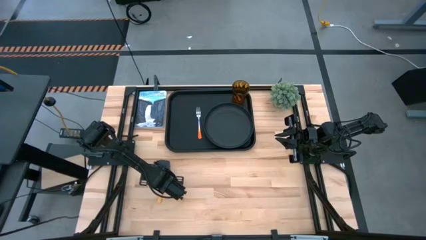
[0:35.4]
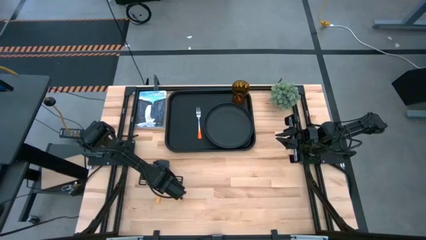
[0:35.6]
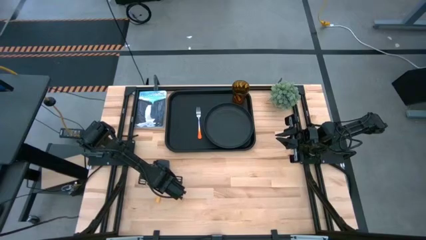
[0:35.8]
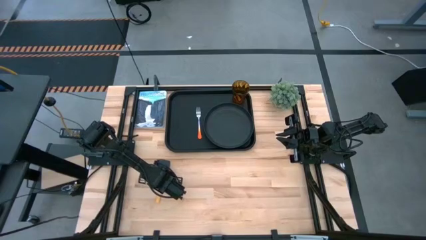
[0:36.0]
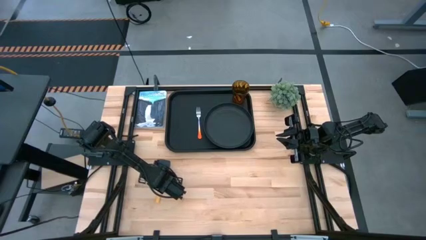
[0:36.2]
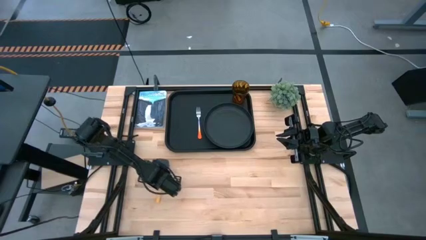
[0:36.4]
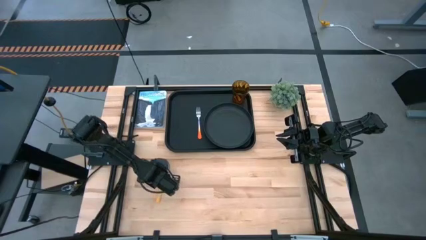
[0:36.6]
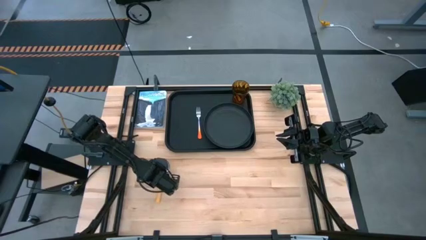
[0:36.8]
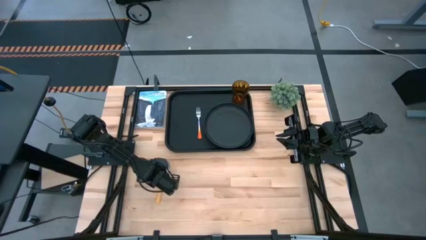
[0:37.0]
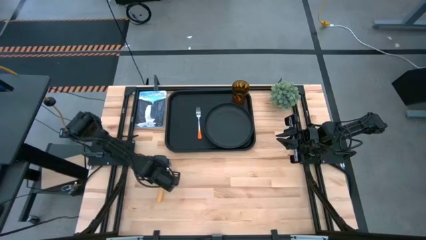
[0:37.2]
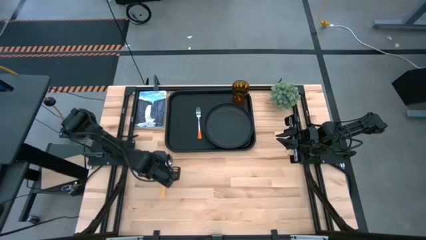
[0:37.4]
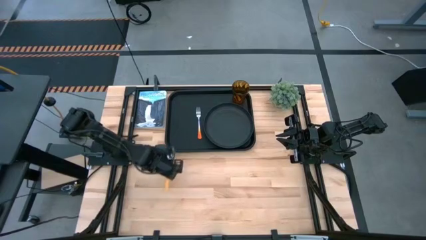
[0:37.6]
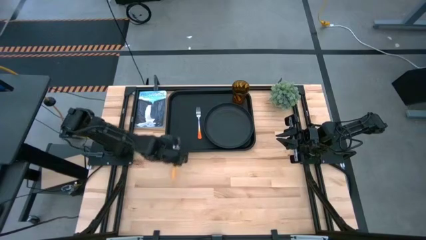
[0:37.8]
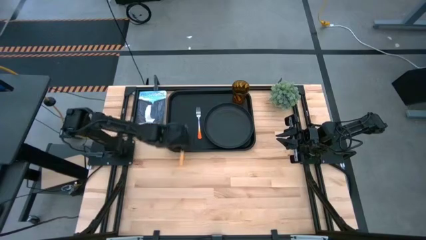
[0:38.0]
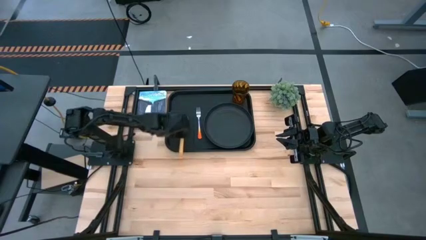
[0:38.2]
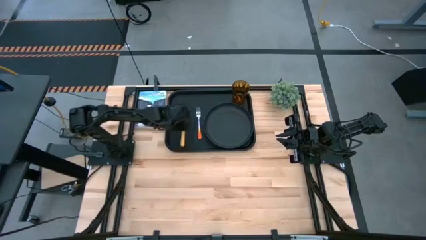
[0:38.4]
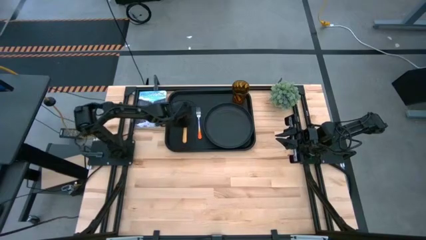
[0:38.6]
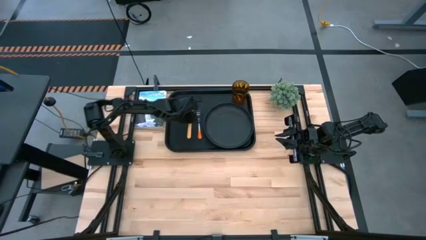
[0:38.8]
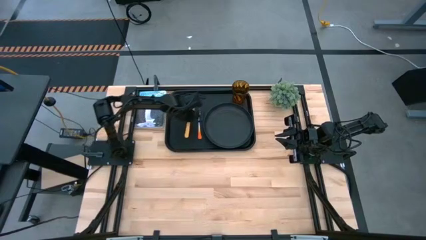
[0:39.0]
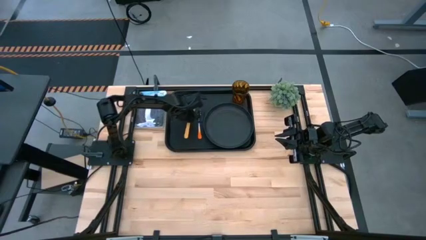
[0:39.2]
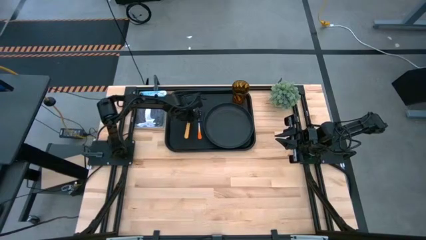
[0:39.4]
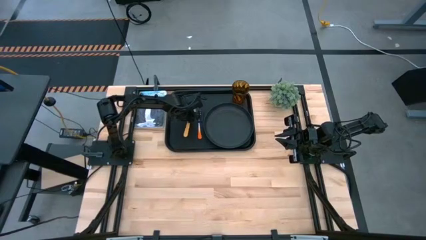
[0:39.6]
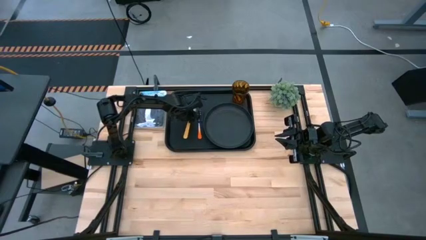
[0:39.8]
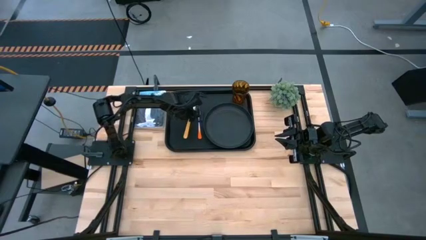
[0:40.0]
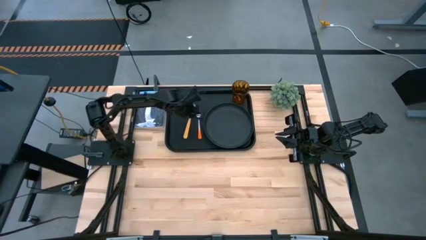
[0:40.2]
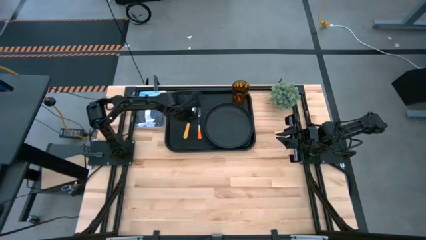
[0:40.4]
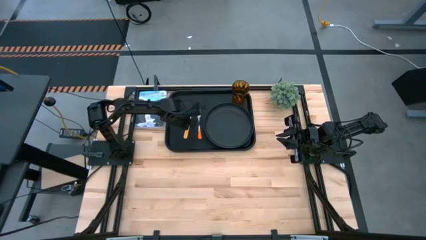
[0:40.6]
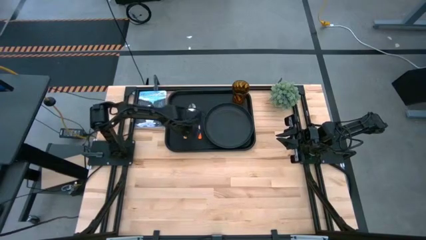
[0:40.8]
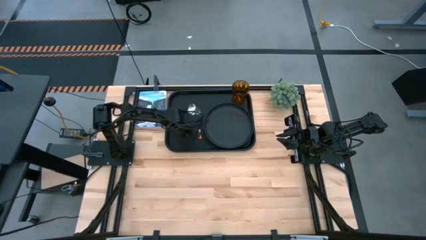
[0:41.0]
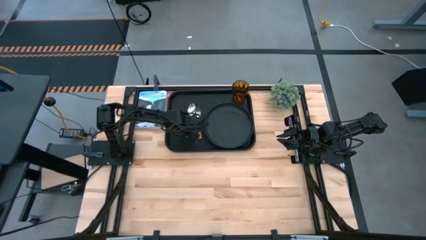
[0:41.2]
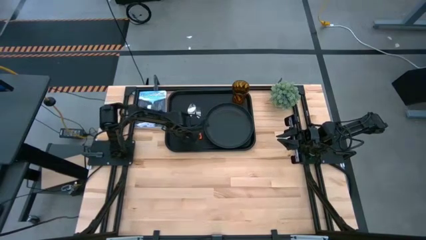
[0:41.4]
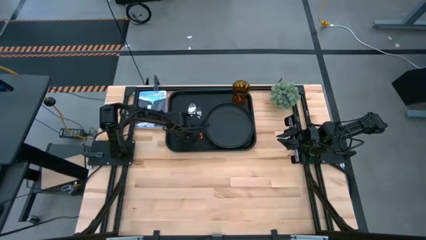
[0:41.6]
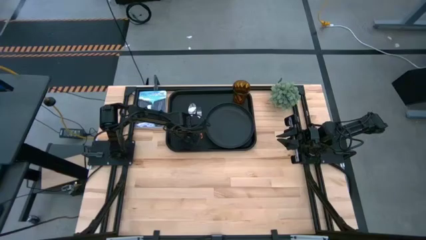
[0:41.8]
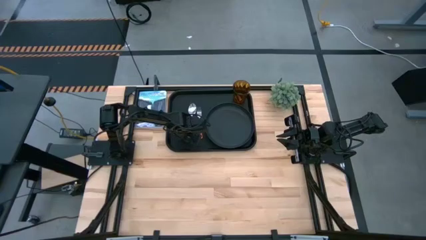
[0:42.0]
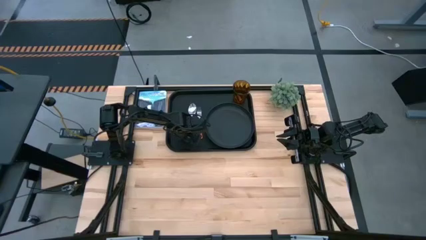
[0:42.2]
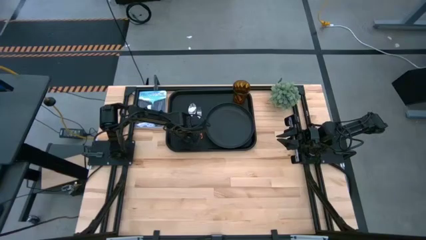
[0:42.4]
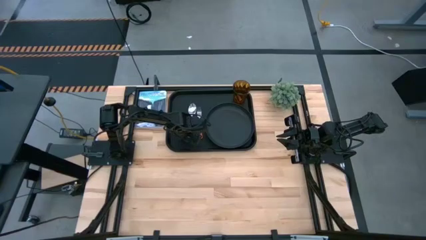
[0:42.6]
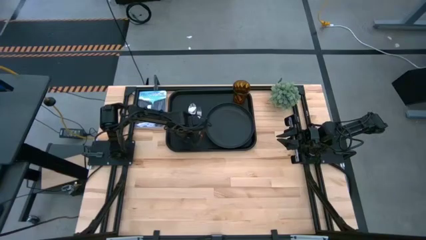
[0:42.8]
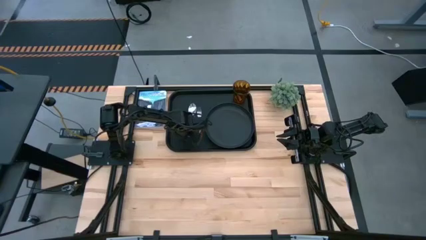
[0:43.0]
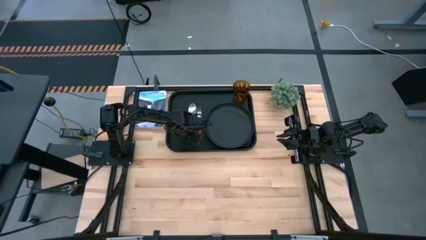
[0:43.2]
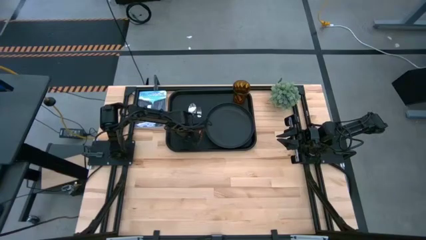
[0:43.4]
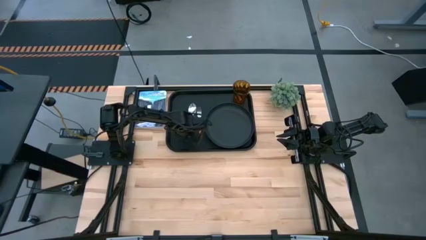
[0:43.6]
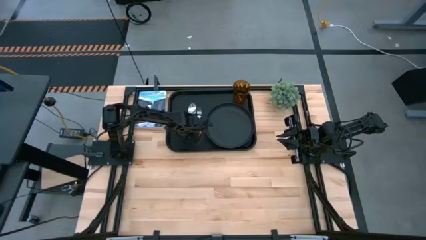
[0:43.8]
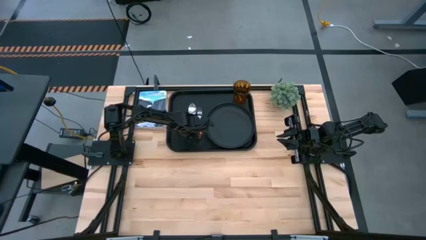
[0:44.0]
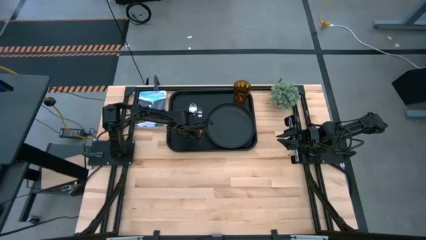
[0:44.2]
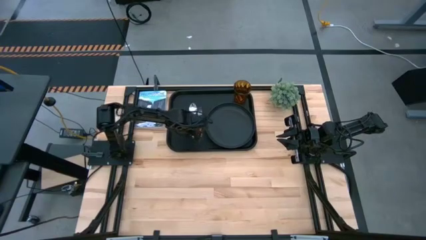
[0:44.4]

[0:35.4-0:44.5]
Task: Pick and place plate/cup/fork/spoon on tray
Put the yellow spoon on the black serving tray to the left side of the black plate

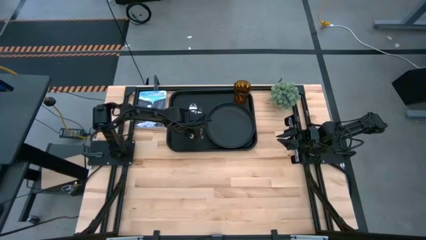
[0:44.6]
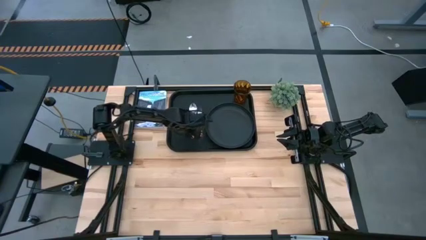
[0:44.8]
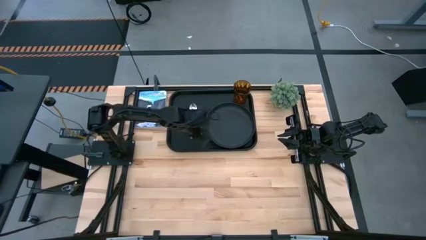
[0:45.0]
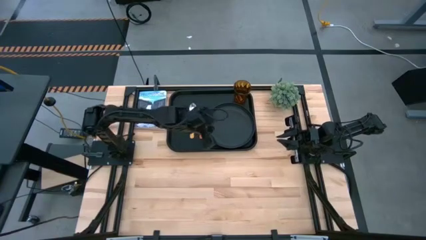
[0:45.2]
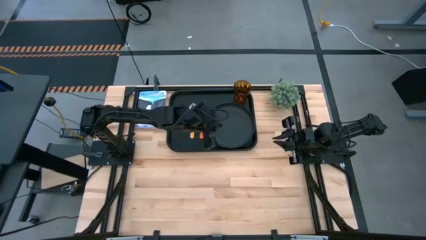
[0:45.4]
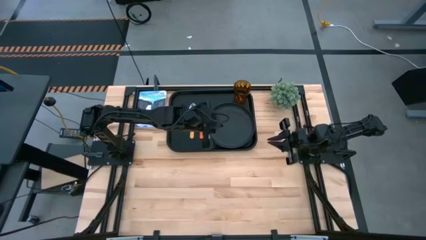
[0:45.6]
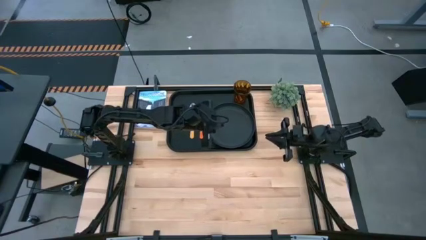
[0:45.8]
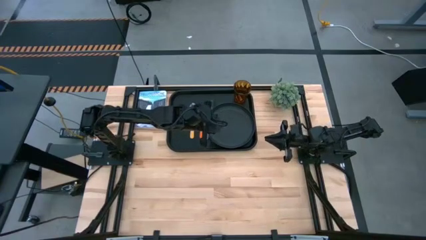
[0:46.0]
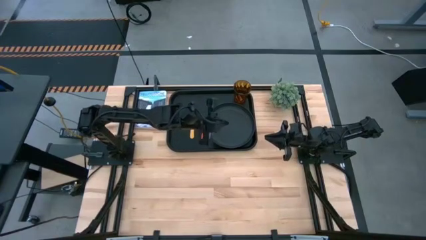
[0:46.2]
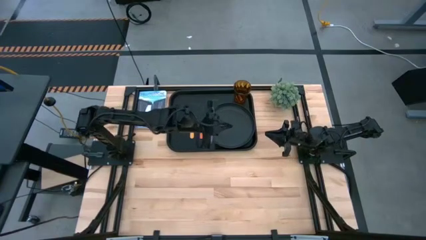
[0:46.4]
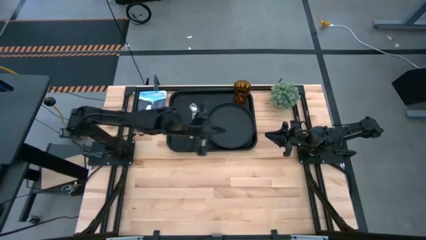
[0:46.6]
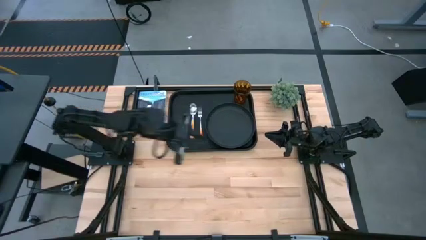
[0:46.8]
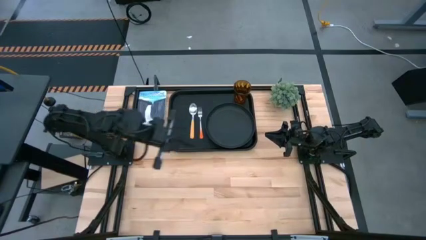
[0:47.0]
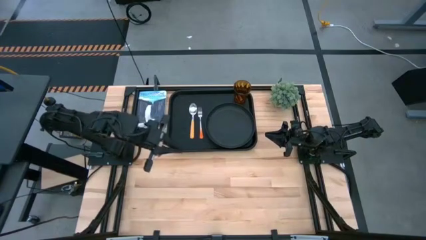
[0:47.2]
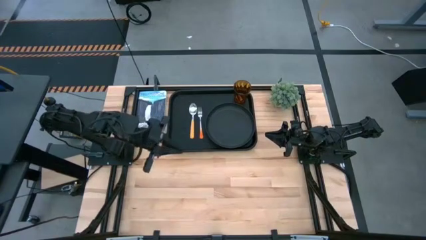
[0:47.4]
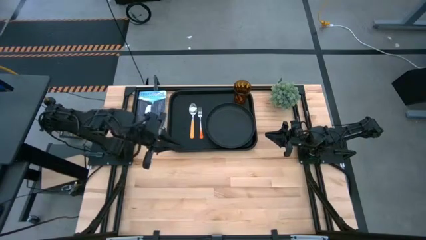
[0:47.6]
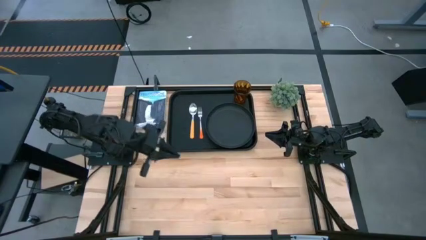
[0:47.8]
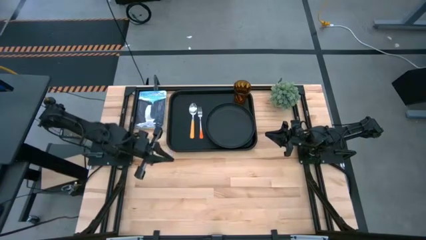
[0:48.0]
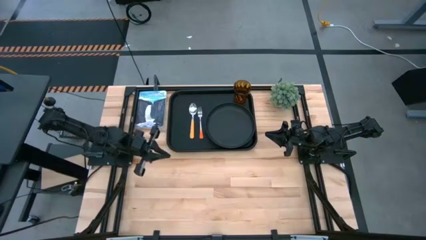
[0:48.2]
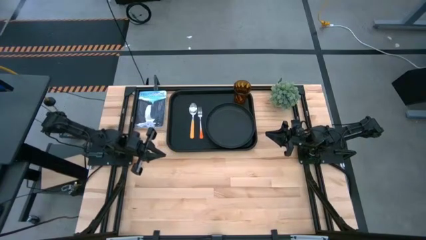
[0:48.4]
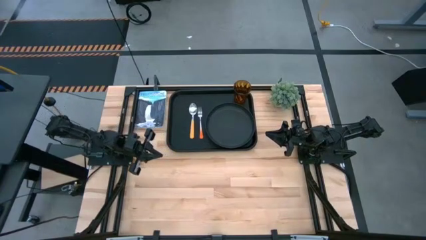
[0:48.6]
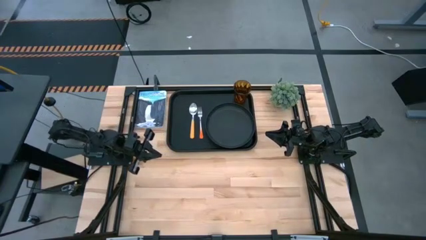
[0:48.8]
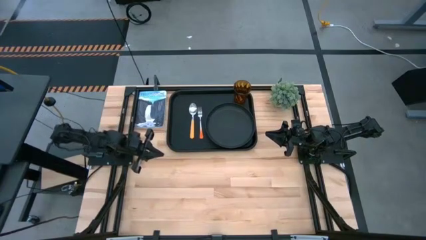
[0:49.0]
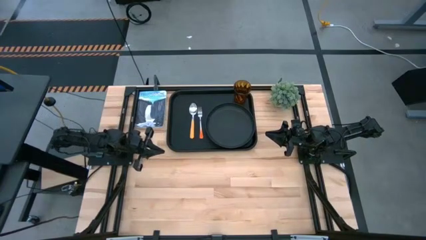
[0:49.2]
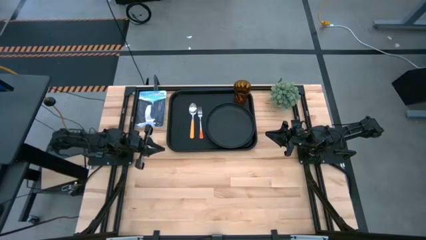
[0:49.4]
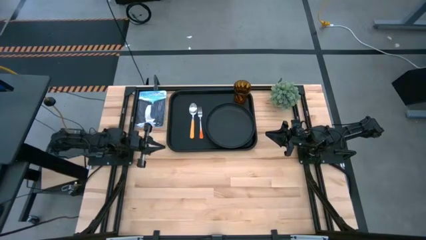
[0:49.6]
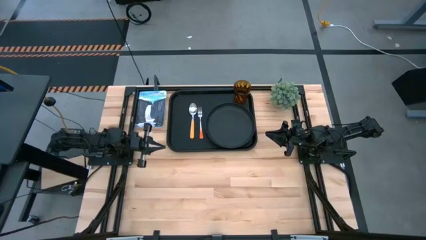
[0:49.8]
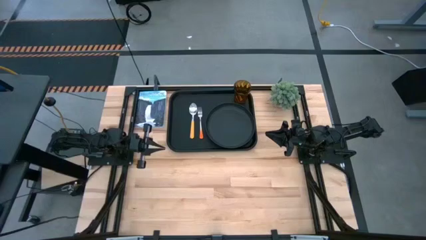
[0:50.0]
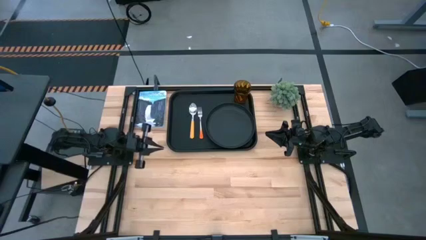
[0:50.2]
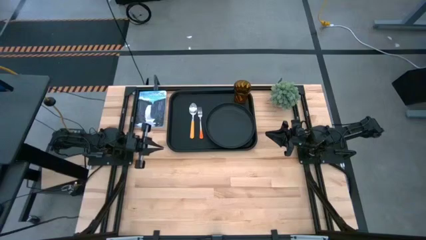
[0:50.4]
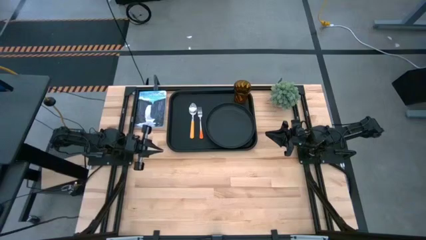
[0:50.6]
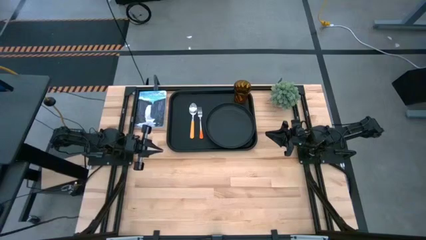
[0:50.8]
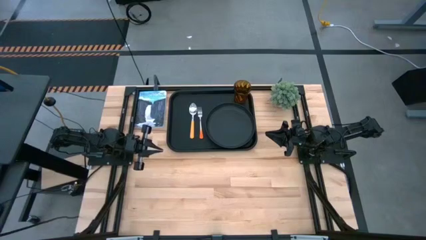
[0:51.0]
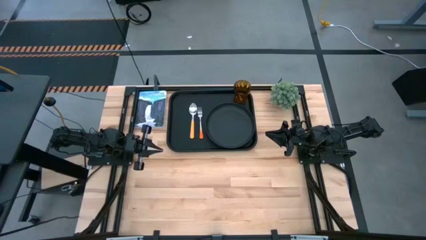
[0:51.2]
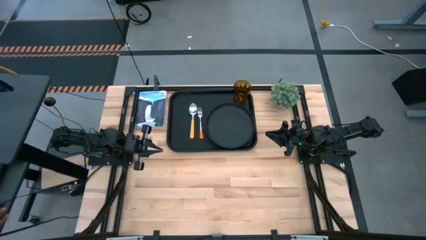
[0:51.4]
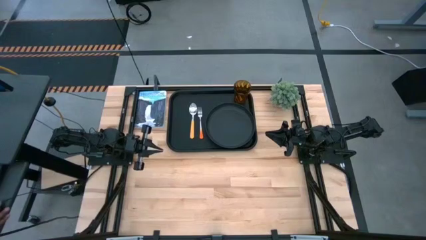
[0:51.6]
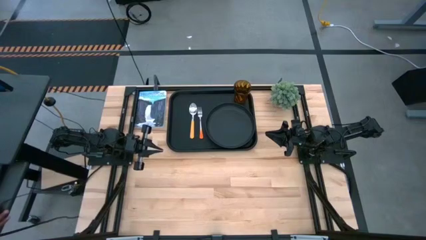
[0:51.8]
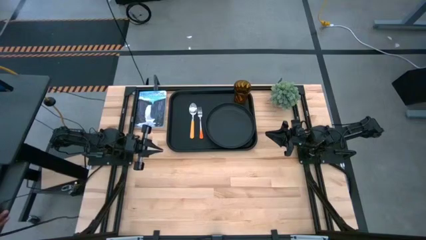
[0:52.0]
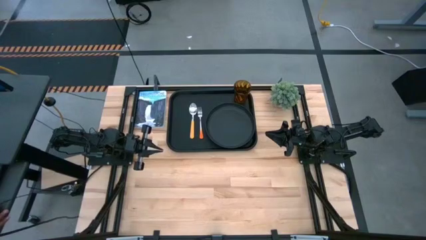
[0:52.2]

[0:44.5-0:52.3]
Return to Home Position
